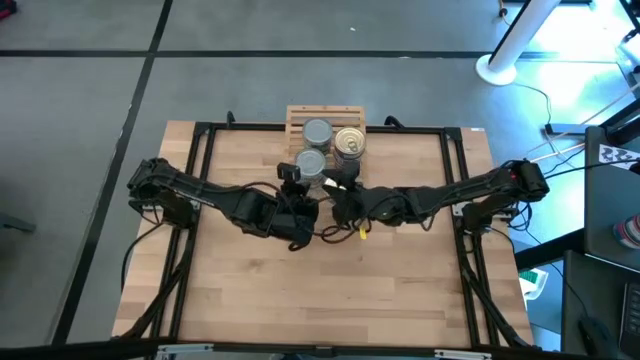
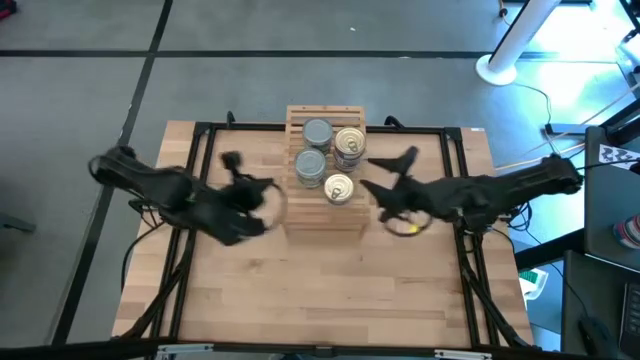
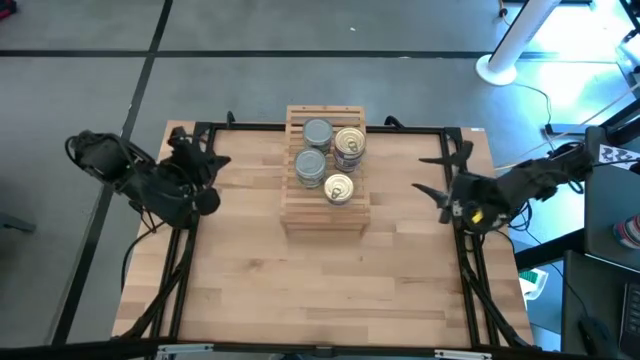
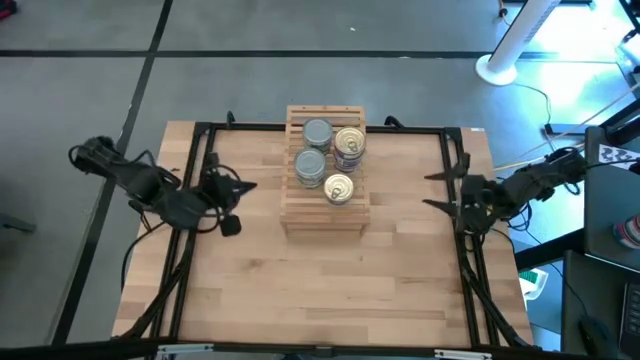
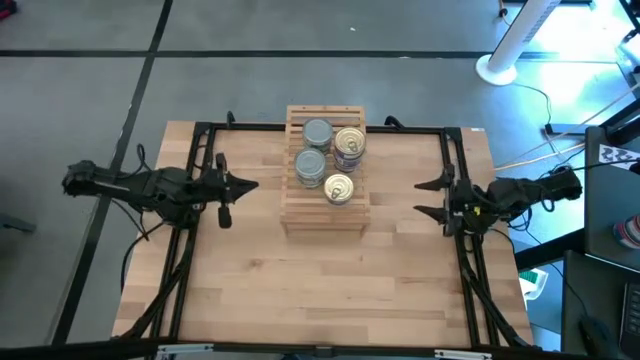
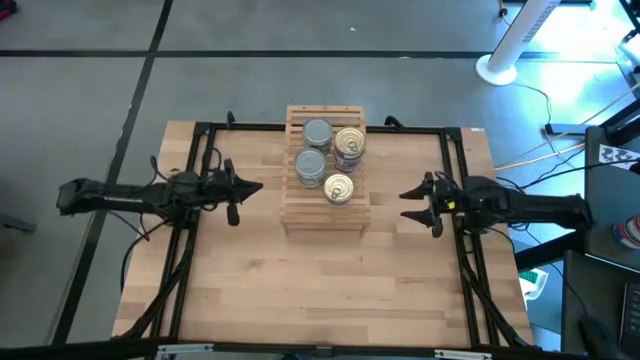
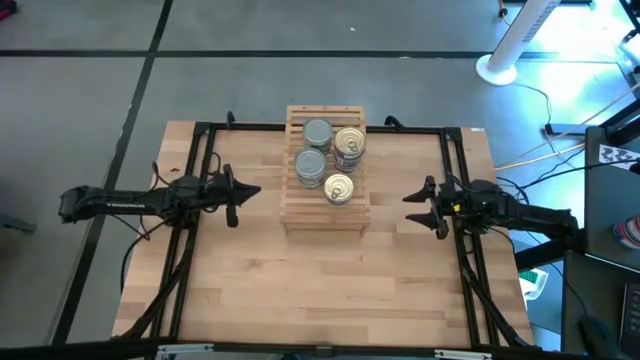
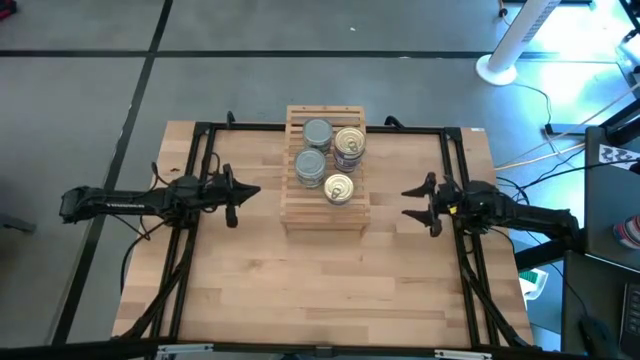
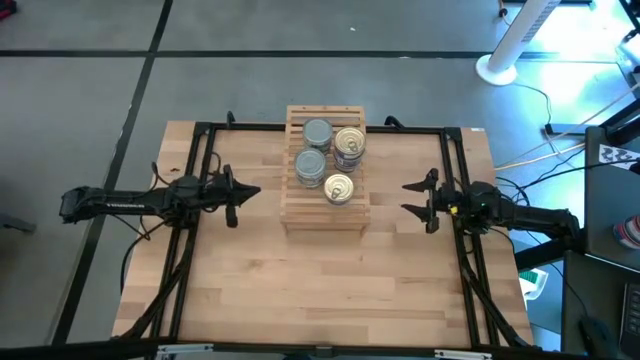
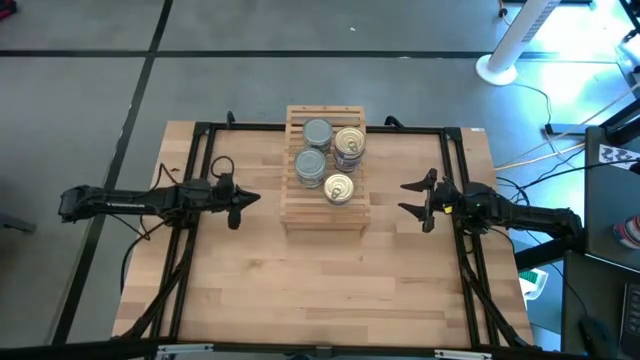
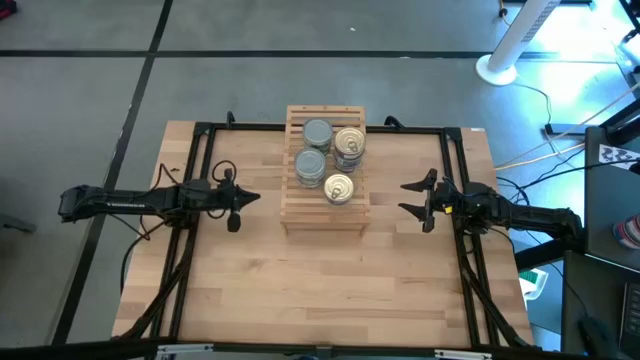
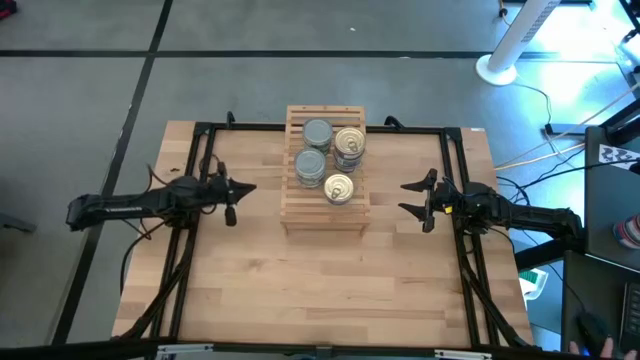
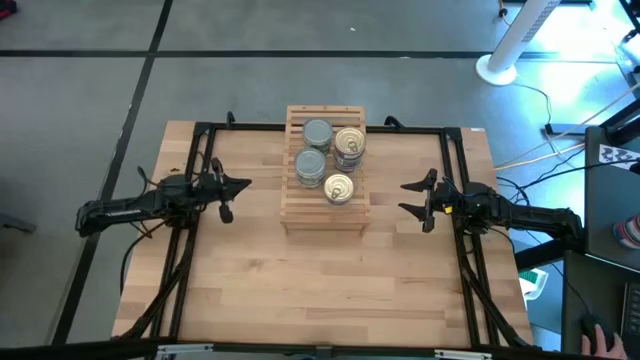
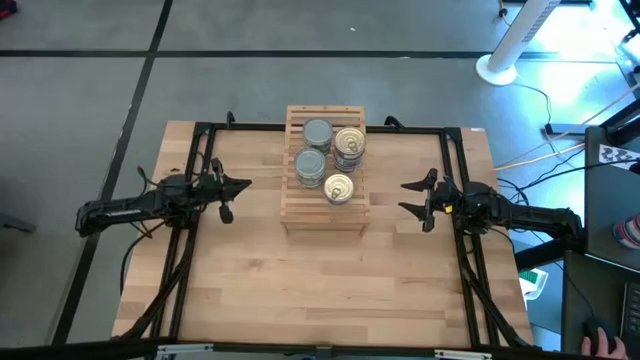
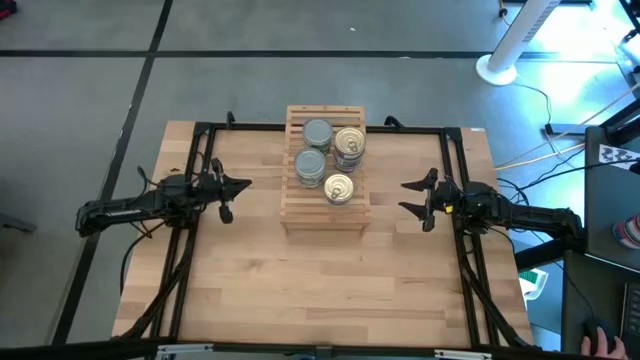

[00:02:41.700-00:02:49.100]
Task: Stack canned seafood by type on shelf
Return to Home Position

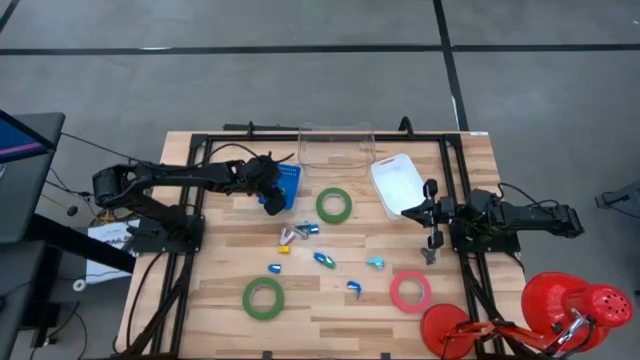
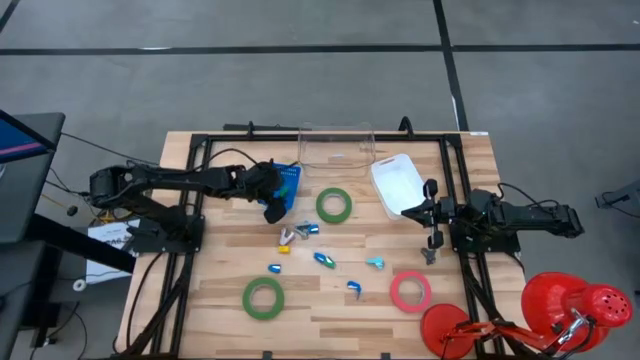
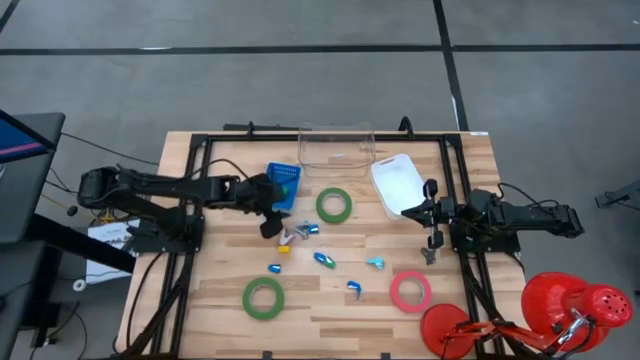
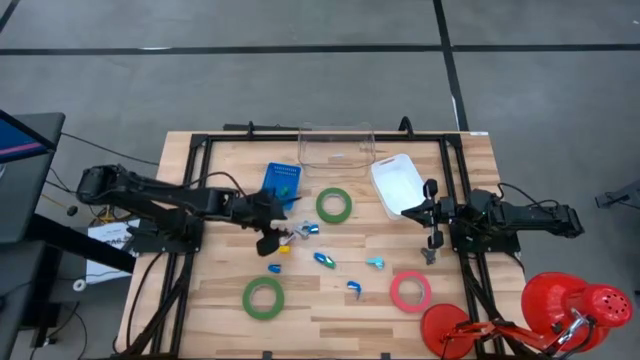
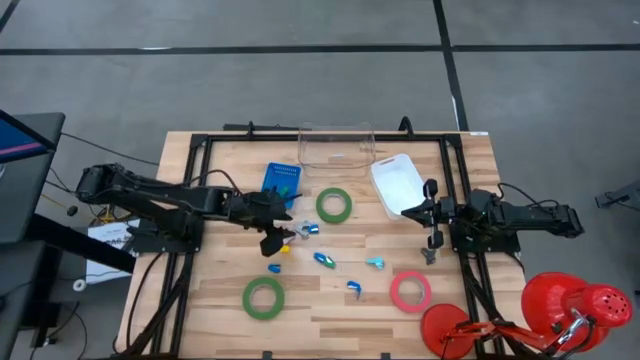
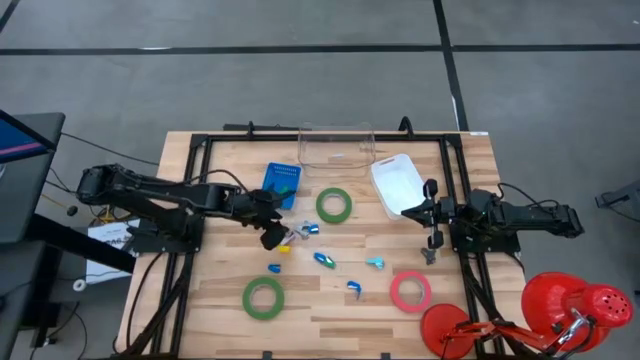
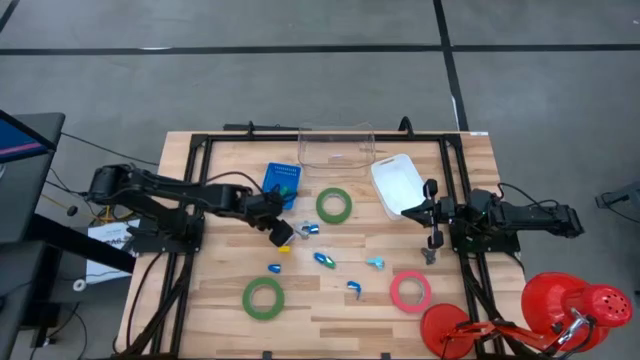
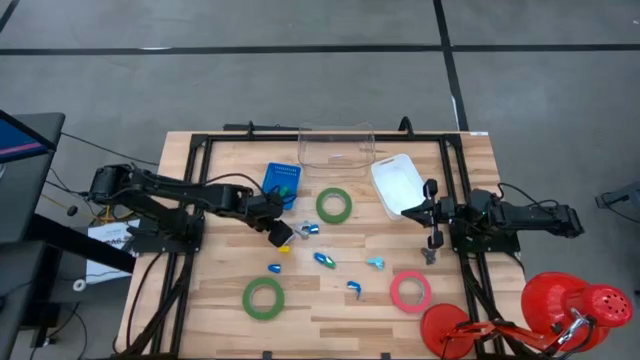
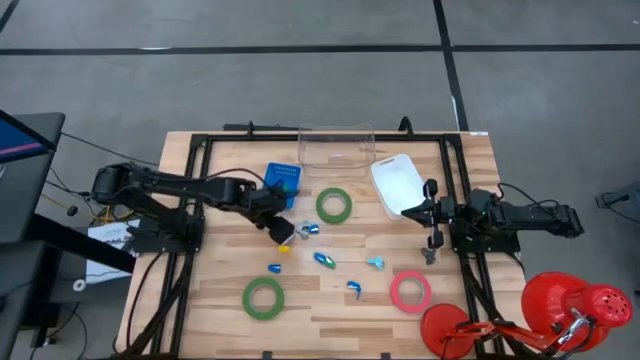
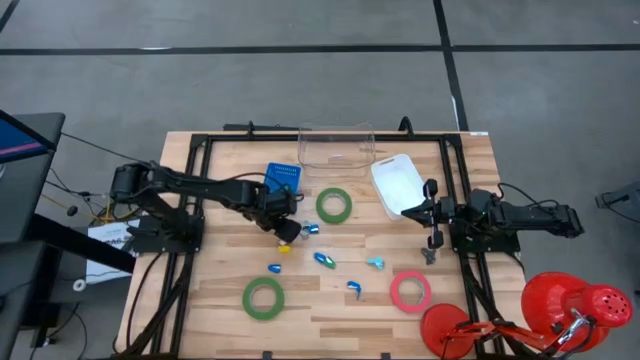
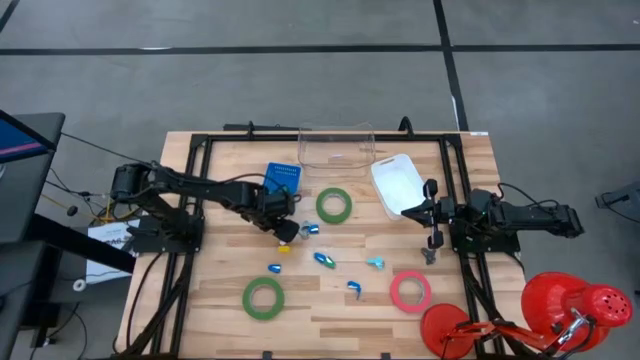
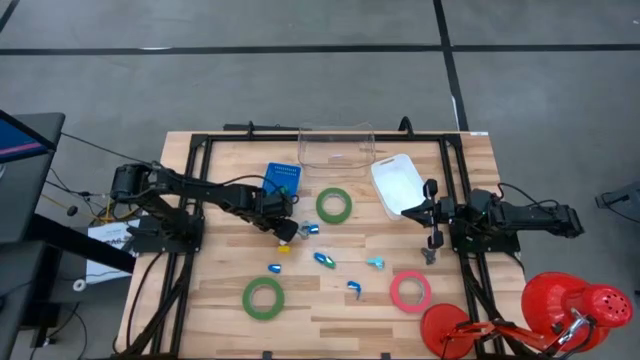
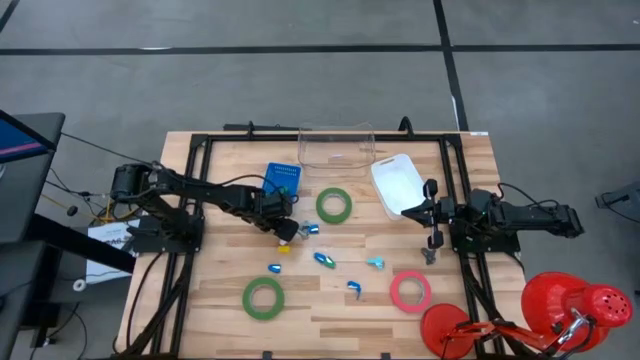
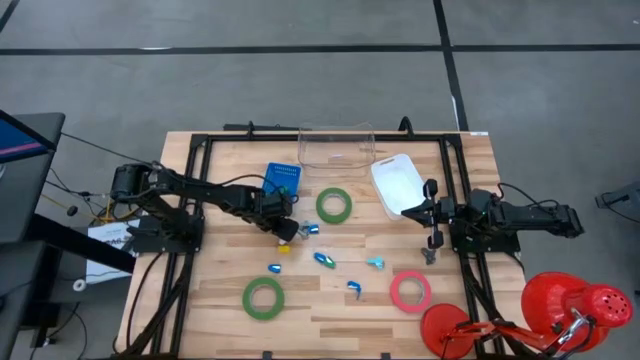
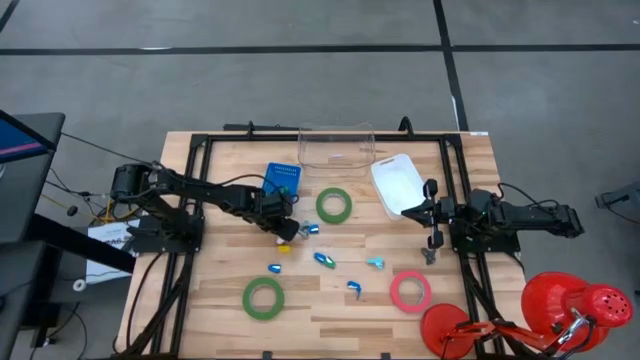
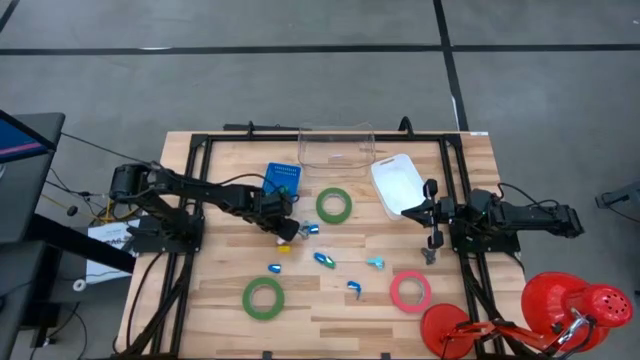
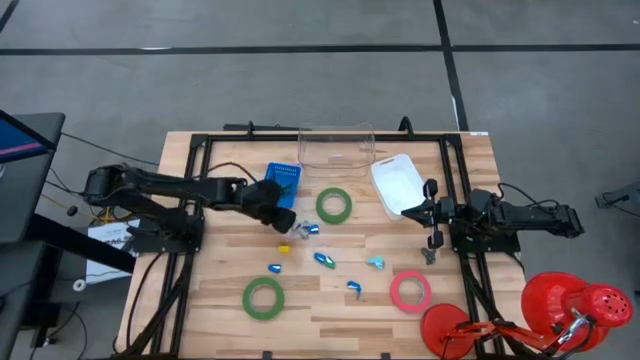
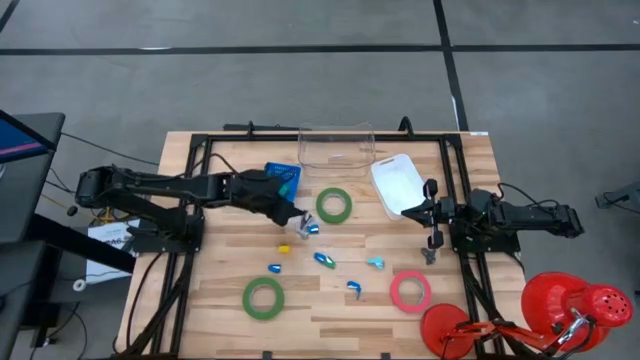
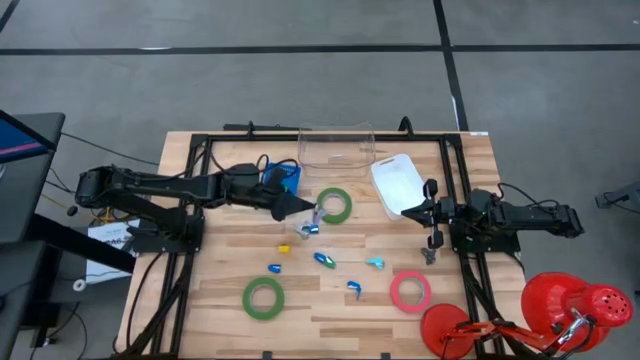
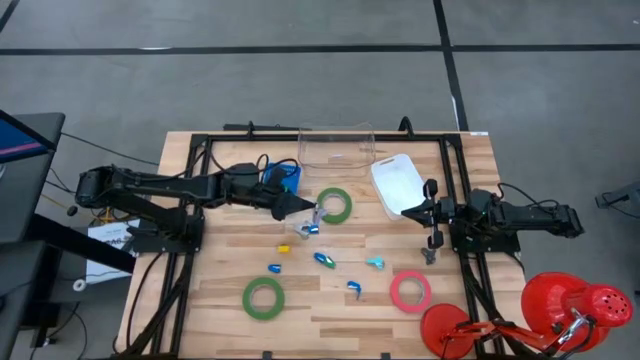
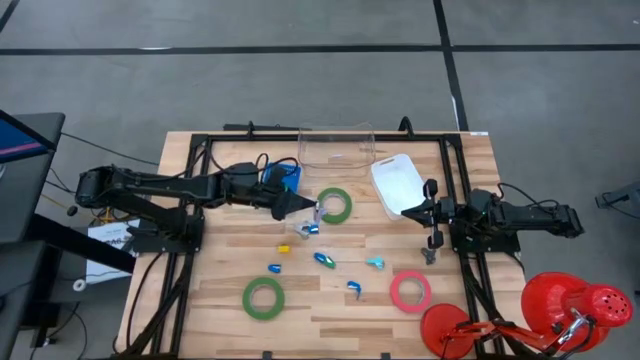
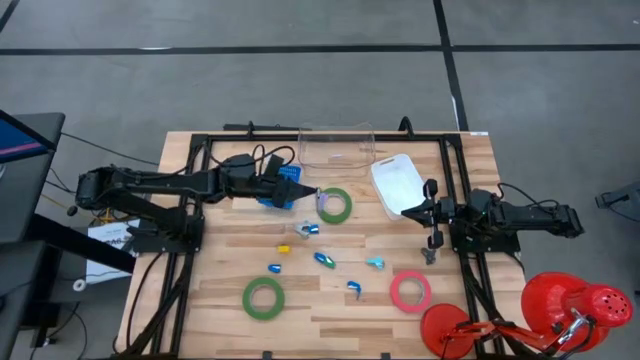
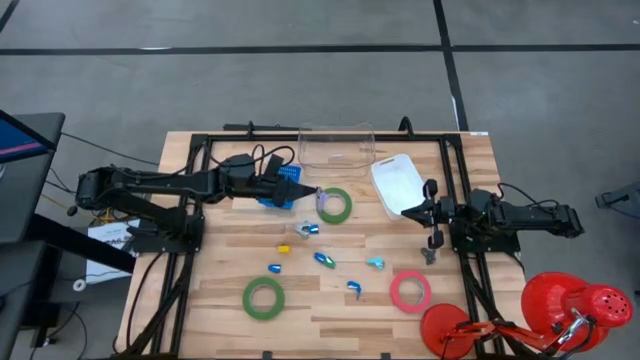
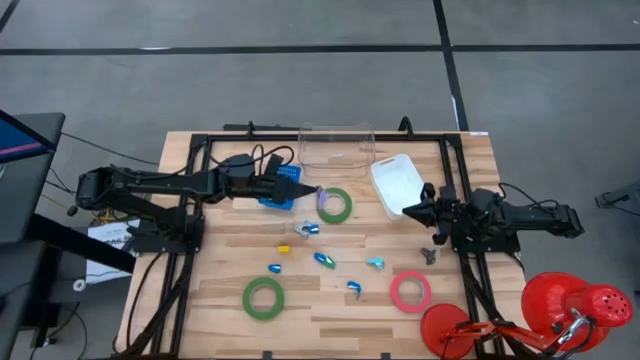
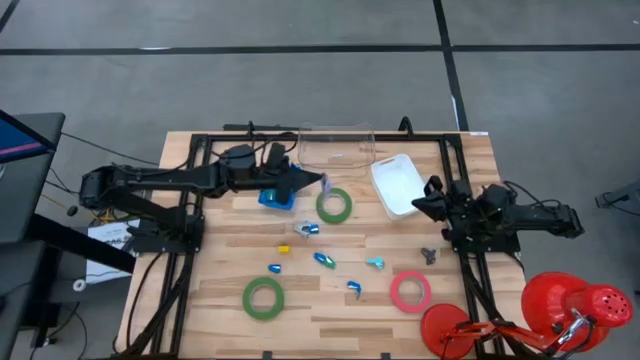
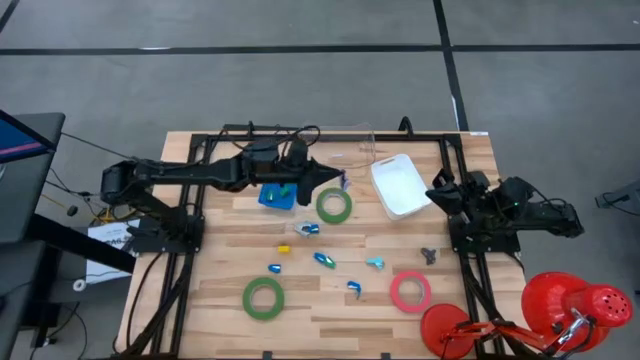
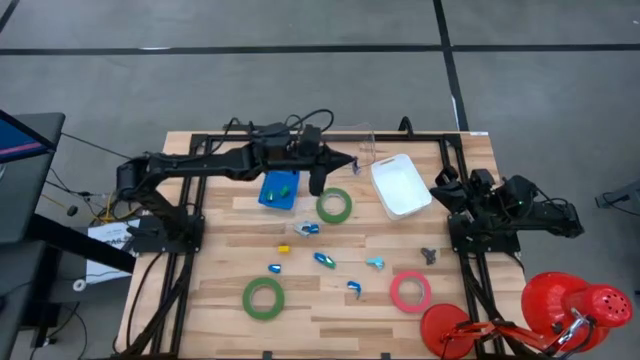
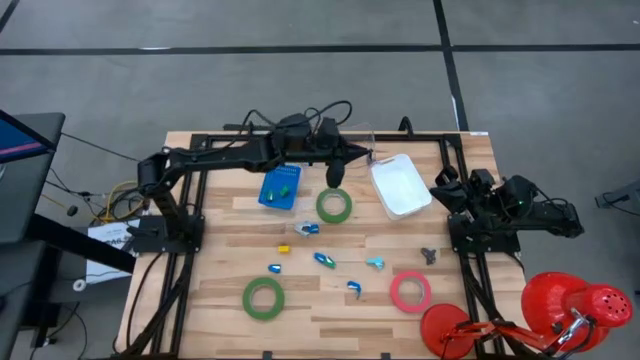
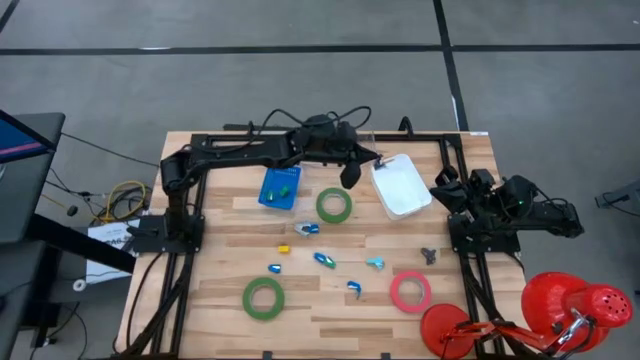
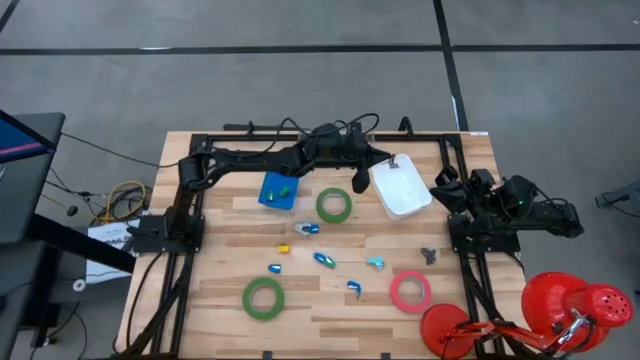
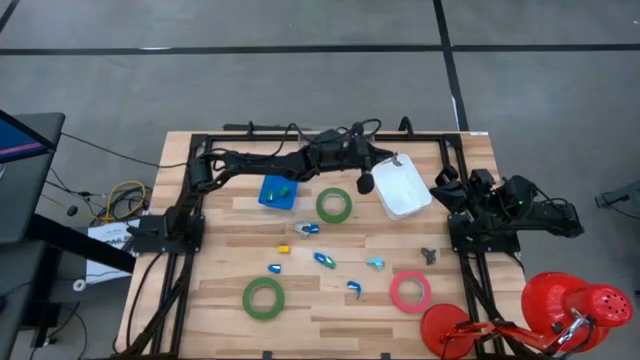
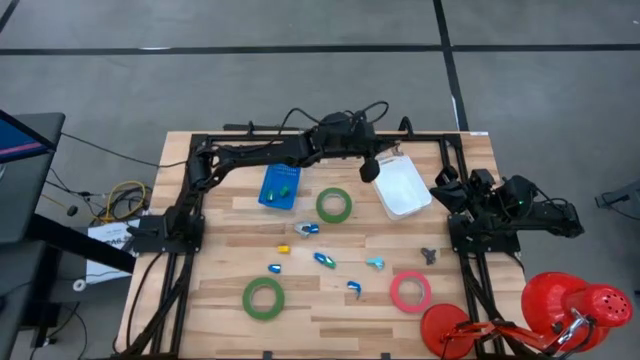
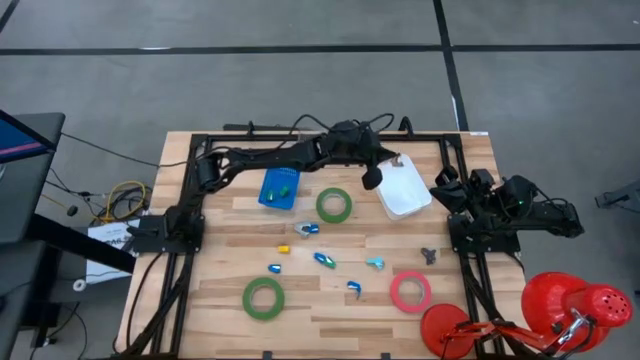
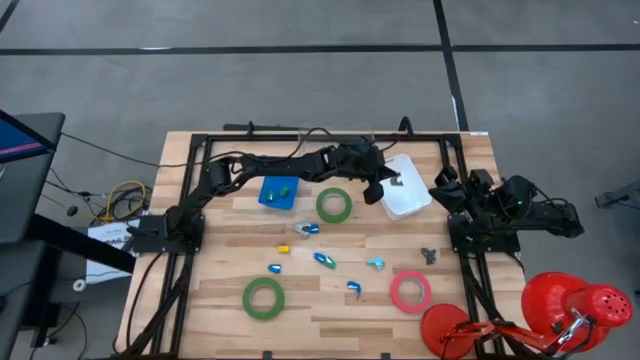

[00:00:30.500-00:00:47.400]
Task: Pick and place Stapler, Stapler remover, tape
Put the purple staple remover into the white bin
